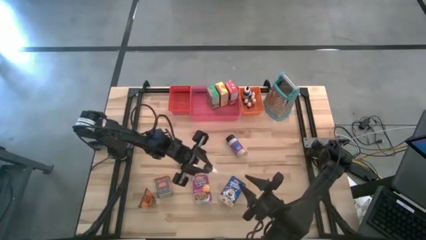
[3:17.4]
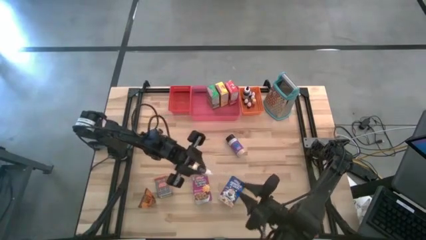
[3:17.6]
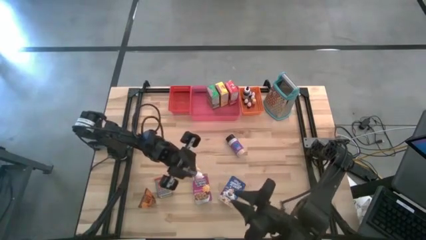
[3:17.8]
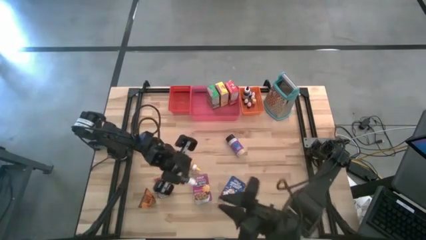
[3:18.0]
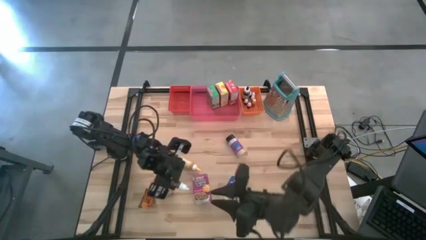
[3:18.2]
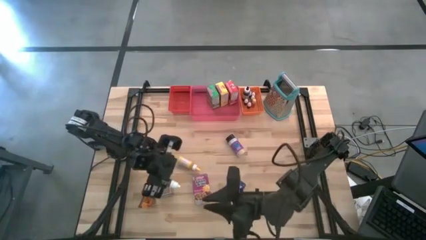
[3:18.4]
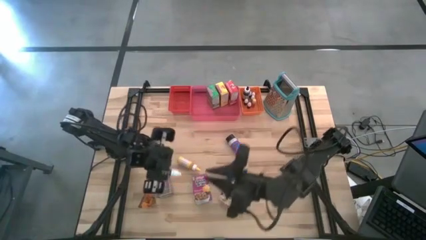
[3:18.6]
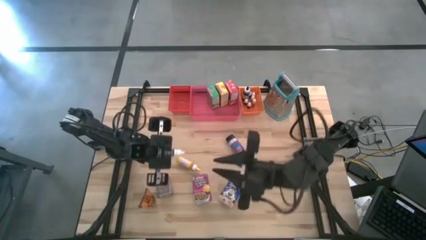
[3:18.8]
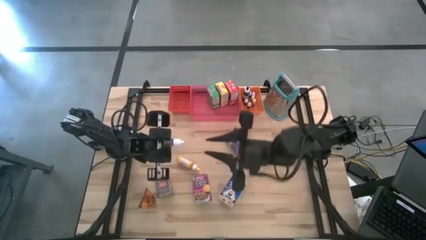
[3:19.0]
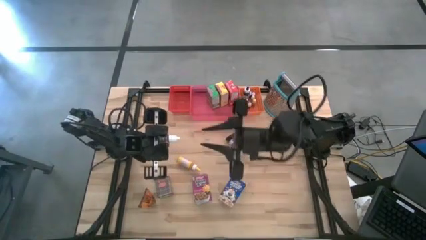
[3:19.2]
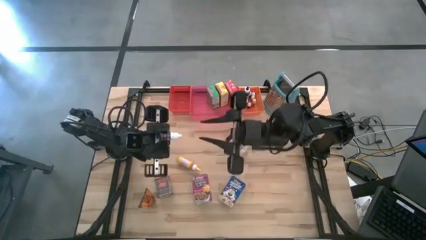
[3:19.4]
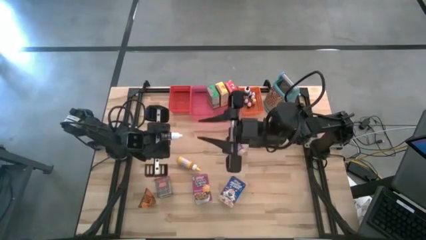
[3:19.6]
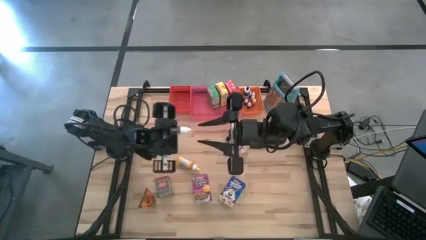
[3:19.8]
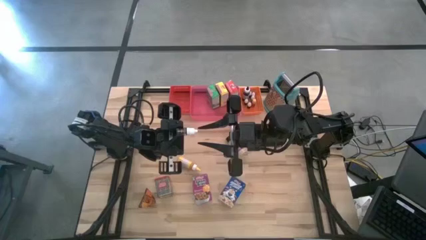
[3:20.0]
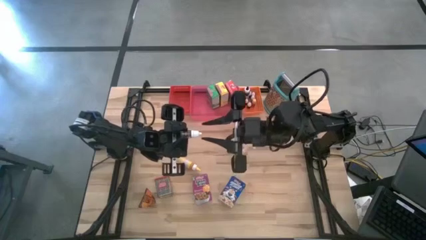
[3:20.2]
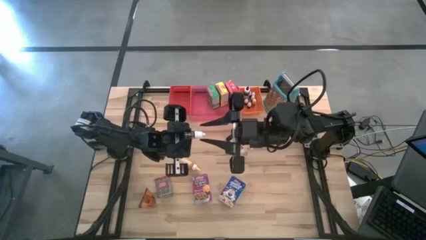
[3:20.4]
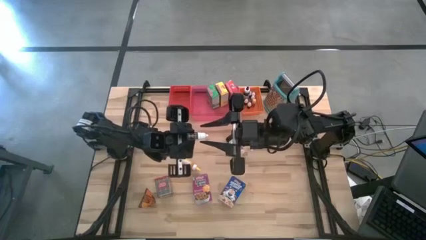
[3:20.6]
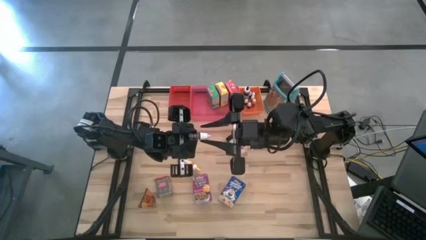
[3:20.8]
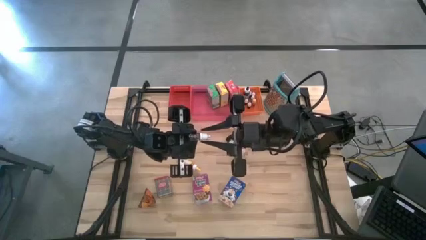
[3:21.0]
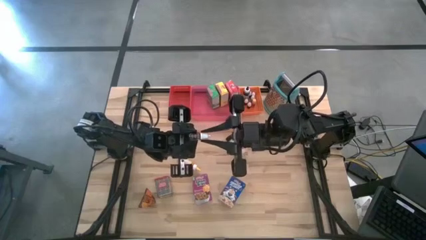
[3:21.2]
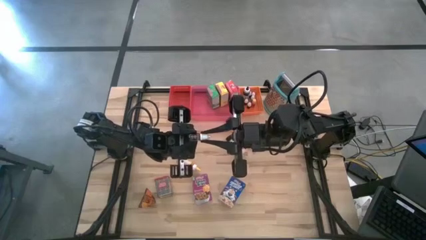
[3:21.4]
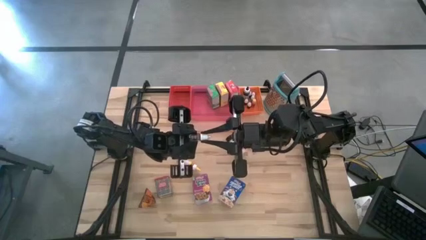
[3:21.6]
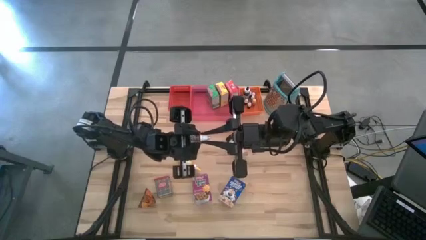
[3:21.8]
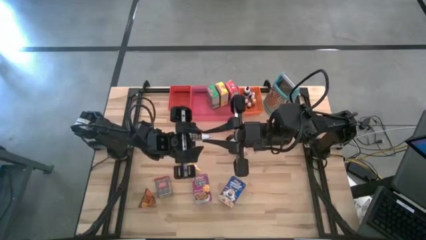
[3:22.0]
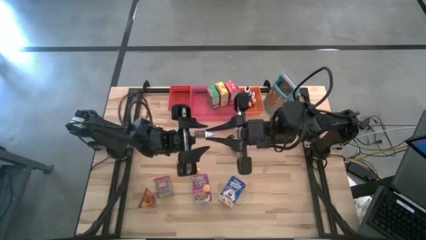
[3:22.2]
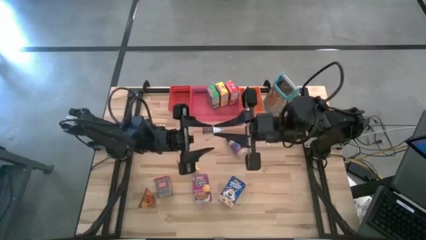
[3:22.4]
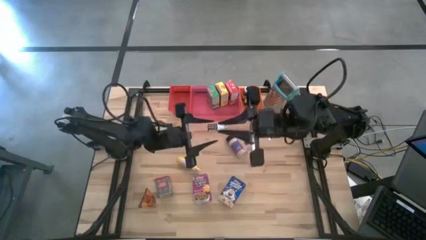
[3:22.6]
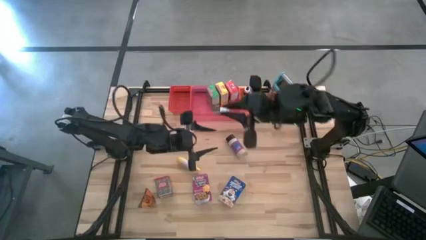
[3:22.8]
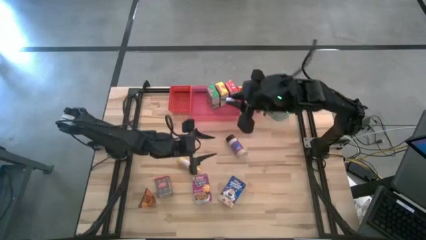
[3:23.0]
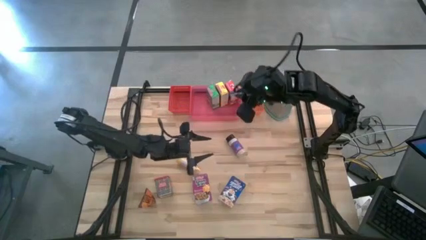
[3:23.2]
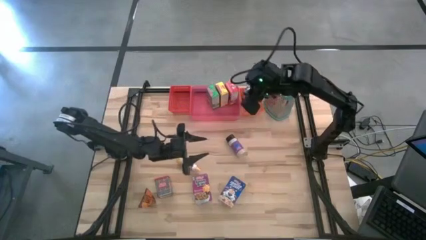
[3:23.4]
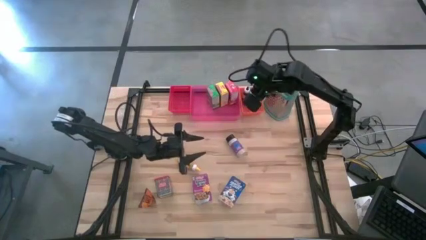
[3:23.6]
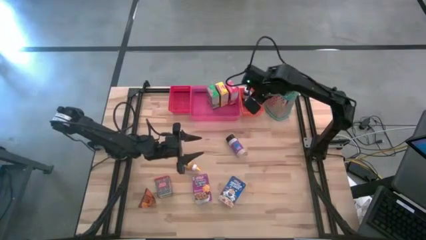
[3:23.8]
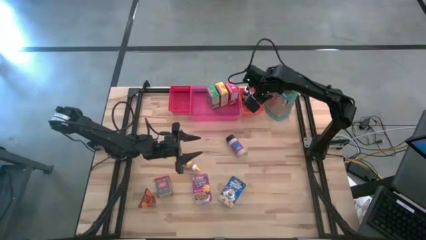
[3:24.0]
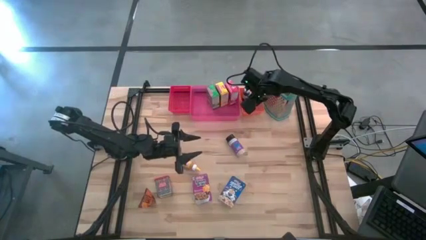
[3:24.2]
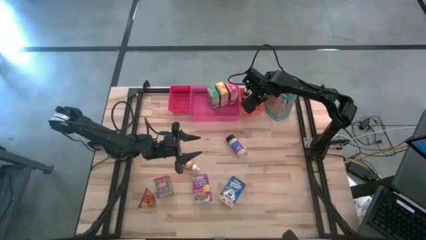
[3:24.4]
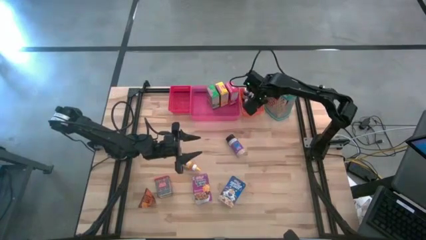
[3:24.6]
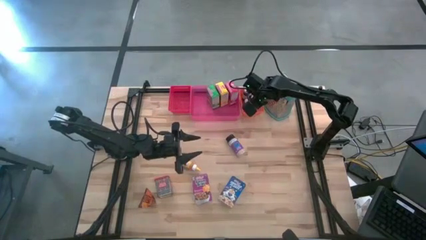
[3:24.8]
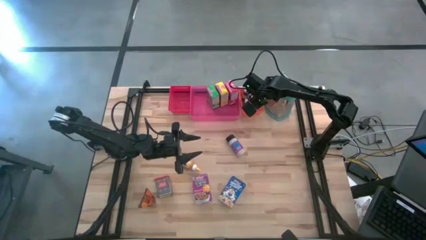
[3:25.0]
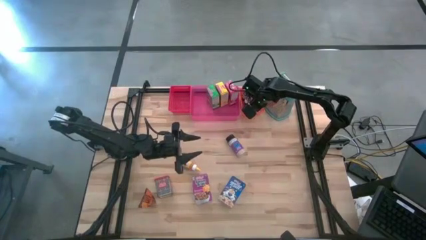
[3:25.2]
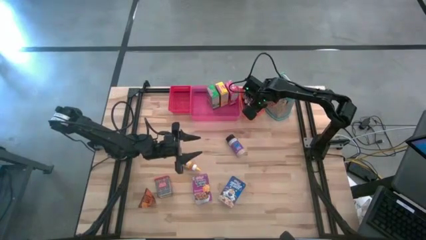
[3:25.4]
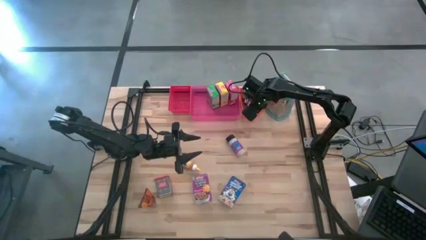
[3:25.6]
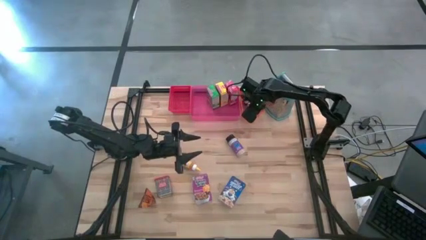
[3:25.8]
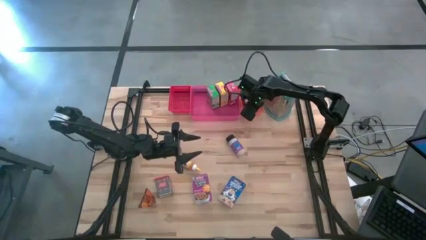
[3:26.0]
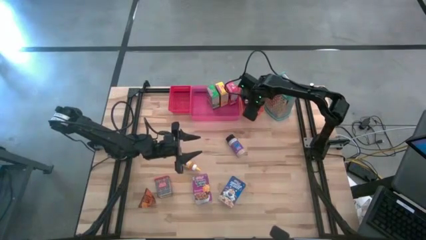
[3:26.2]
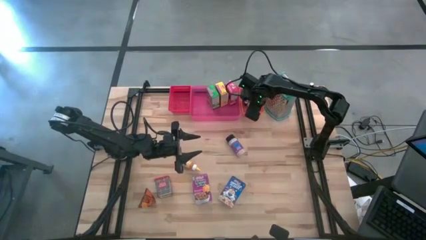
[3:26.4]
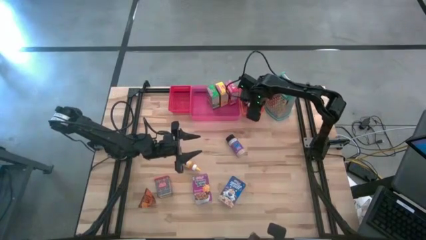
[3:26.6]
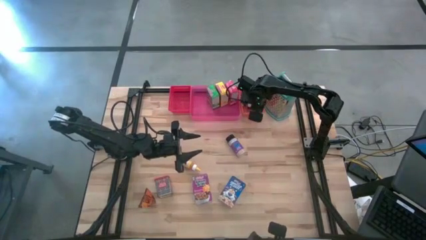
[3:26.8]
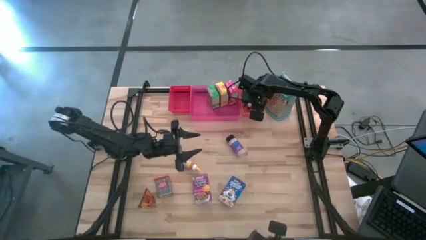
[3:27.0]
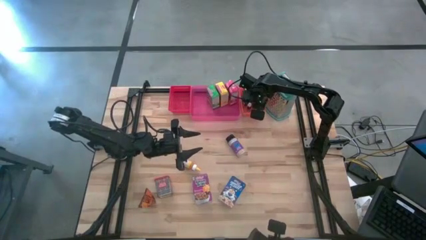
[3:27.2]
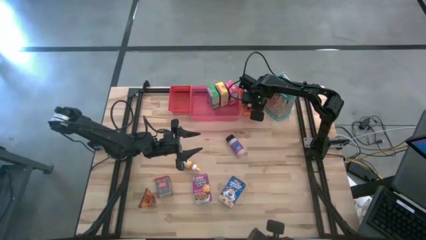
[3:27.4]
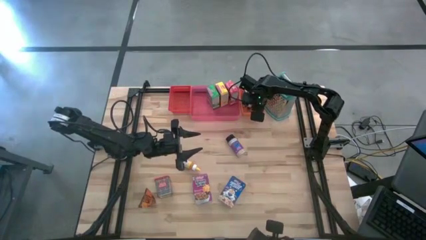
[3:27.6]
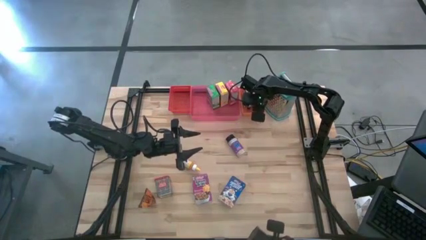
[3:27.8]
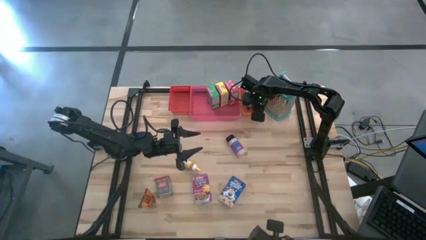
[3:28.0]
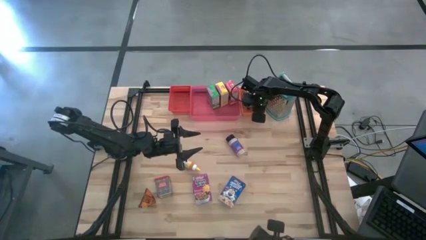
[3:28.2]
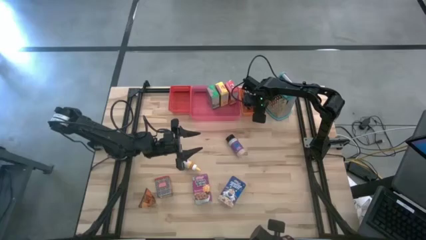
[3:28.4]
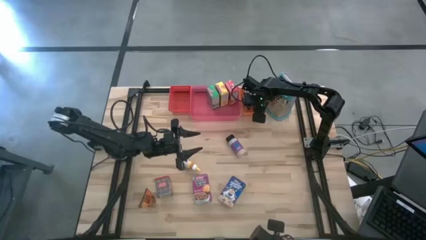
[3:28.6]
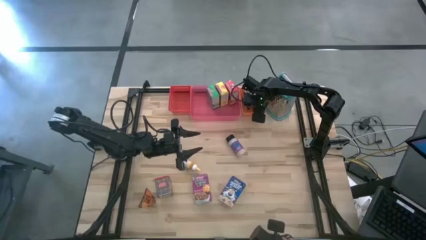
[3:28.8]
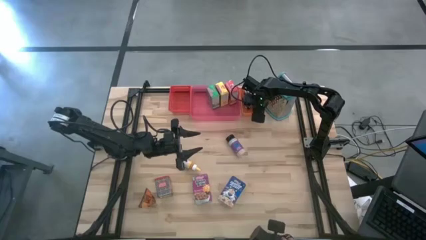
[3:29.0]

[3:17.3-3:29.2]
Task: Pick & Place Kitchen Items
Put the brown food coloring bottle into the orange bin
